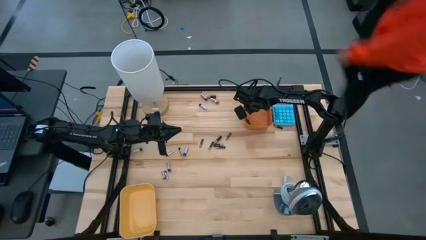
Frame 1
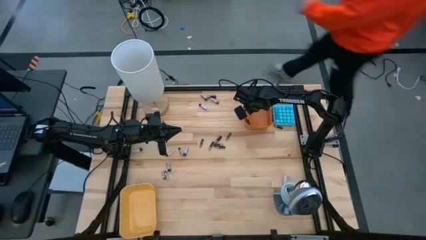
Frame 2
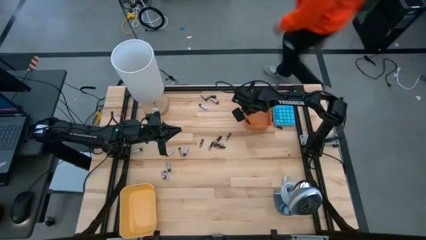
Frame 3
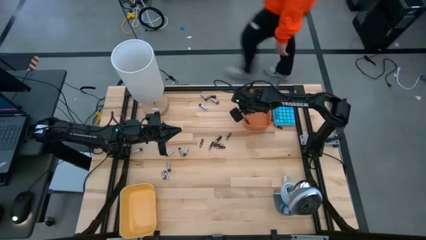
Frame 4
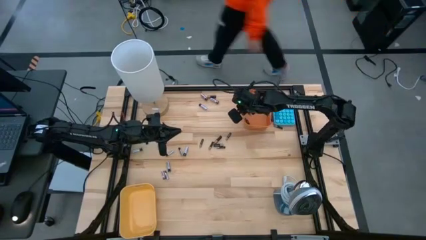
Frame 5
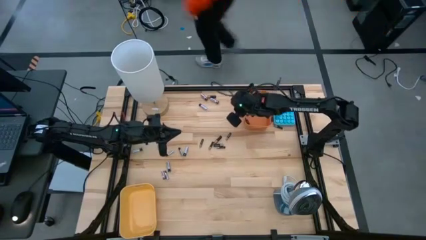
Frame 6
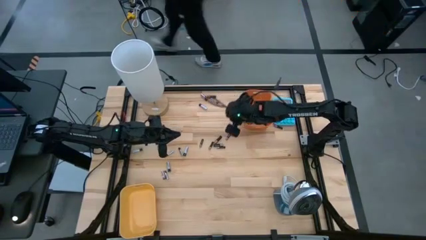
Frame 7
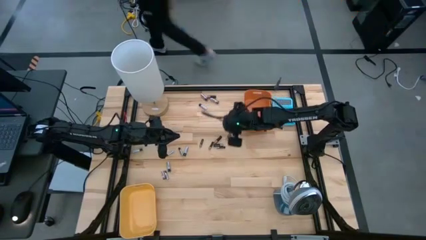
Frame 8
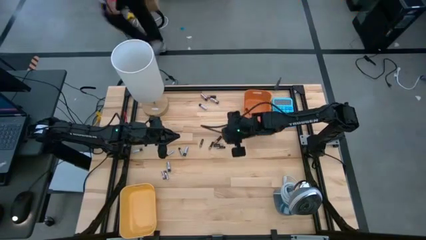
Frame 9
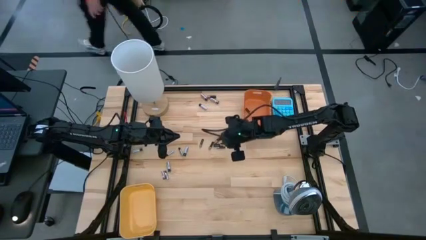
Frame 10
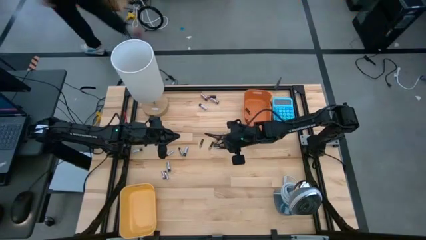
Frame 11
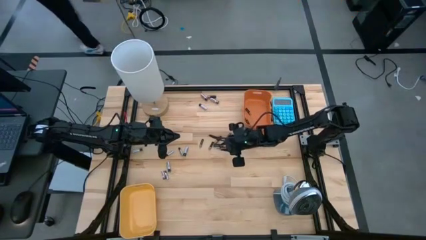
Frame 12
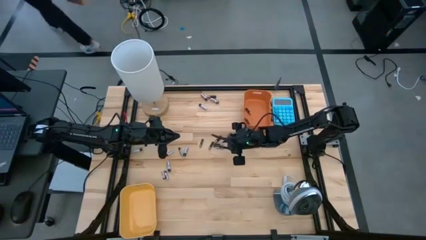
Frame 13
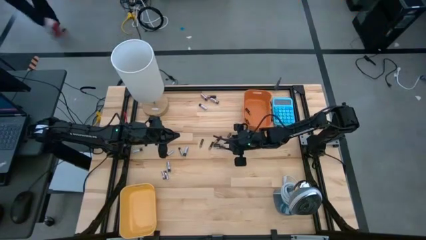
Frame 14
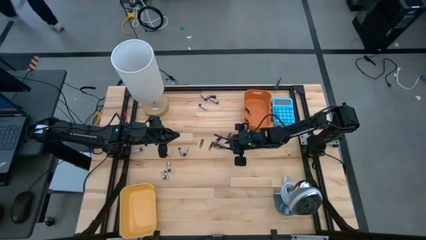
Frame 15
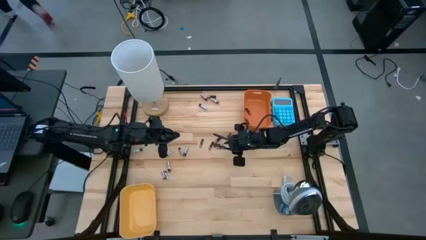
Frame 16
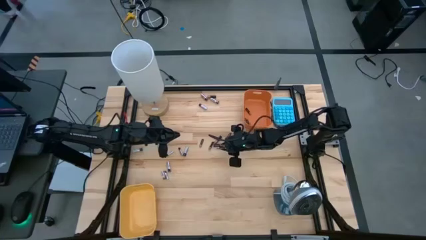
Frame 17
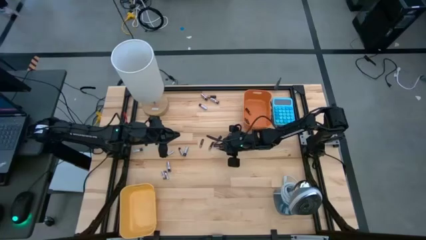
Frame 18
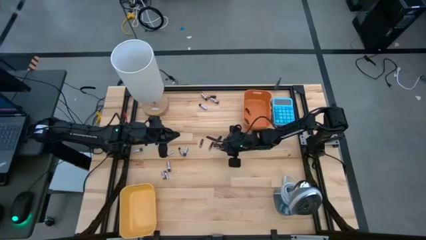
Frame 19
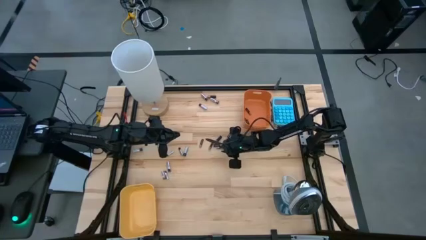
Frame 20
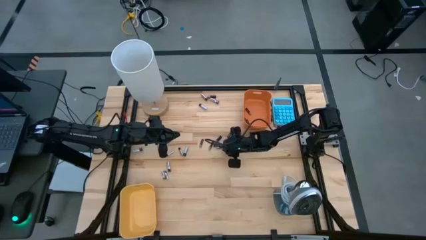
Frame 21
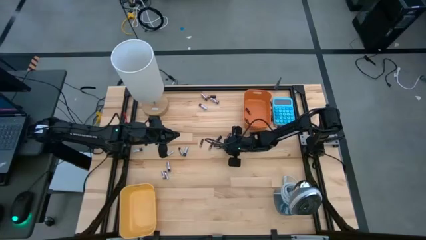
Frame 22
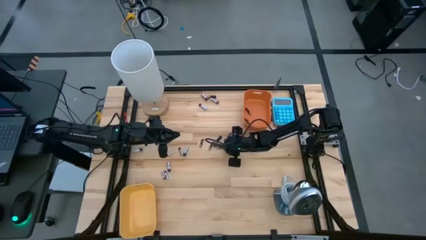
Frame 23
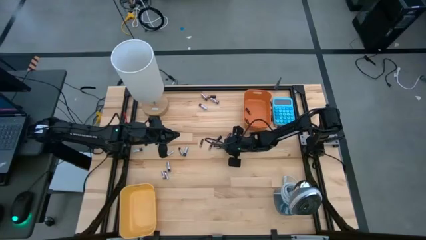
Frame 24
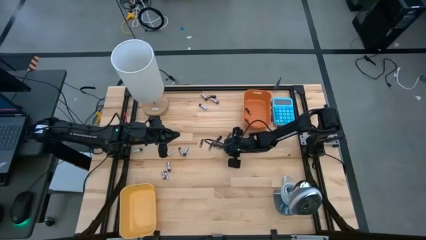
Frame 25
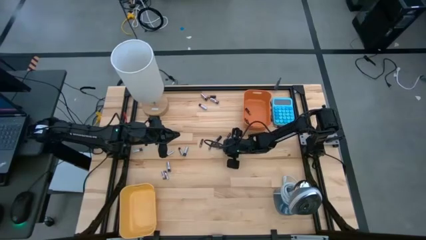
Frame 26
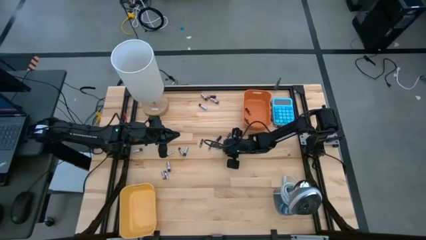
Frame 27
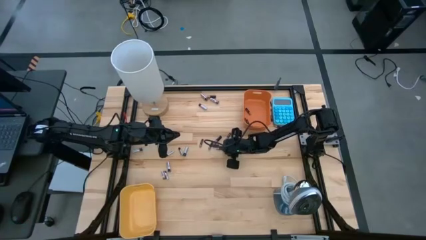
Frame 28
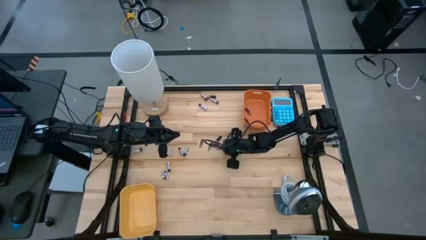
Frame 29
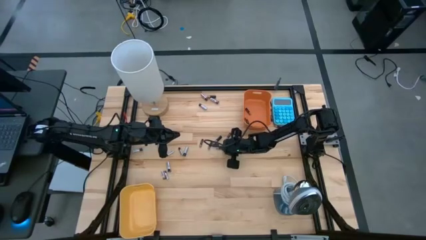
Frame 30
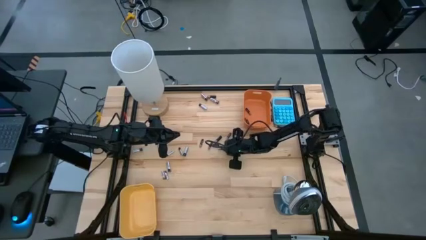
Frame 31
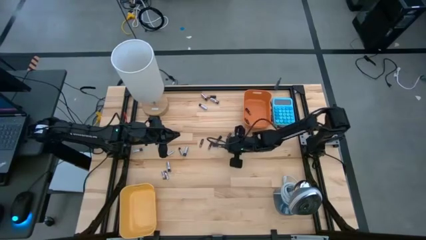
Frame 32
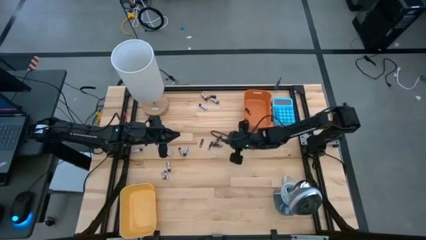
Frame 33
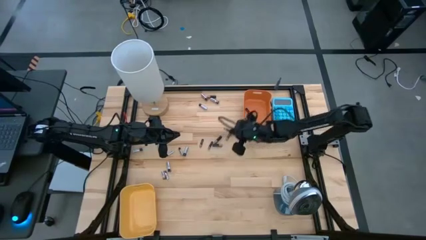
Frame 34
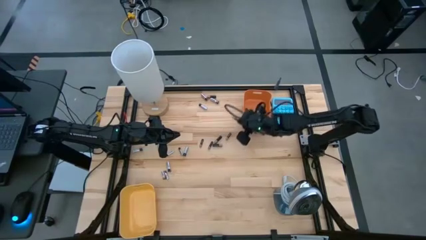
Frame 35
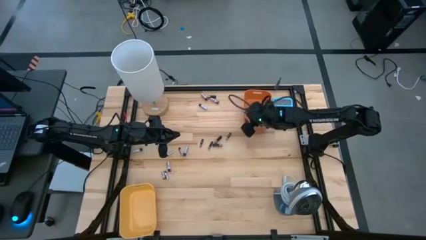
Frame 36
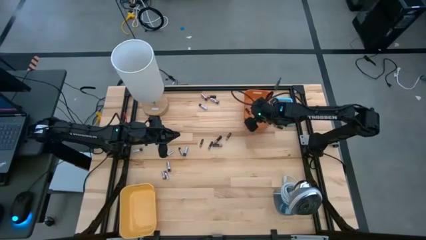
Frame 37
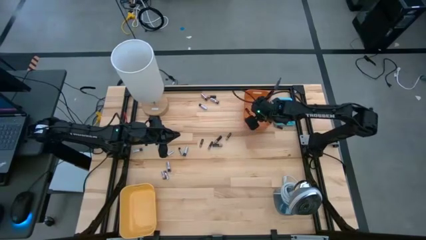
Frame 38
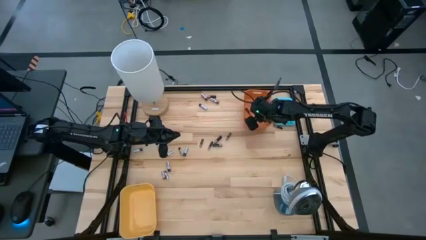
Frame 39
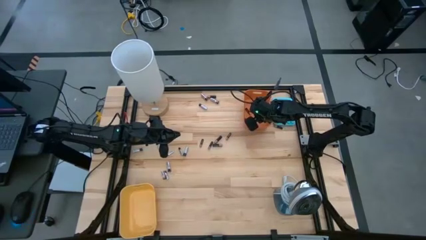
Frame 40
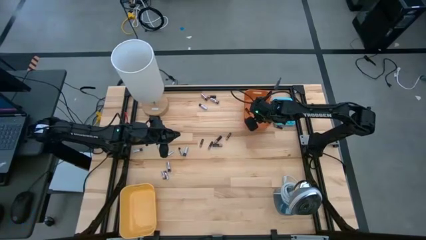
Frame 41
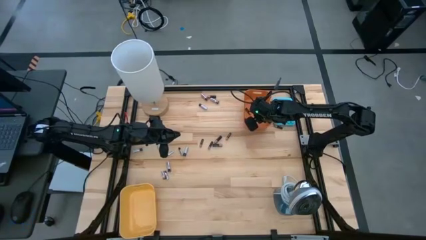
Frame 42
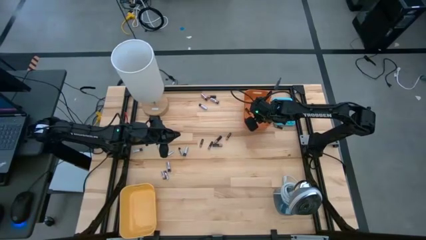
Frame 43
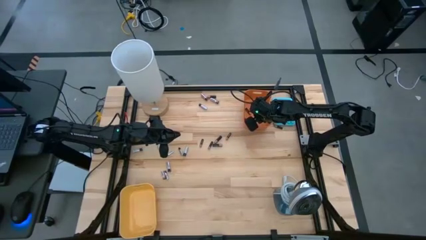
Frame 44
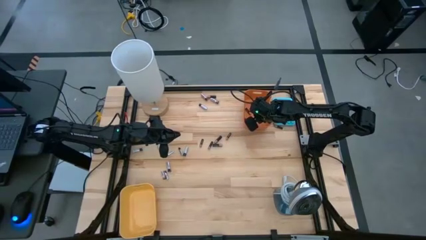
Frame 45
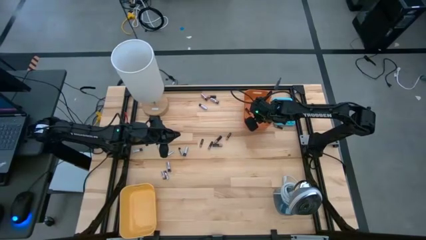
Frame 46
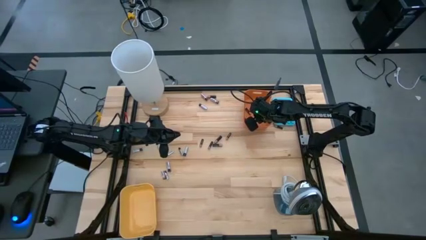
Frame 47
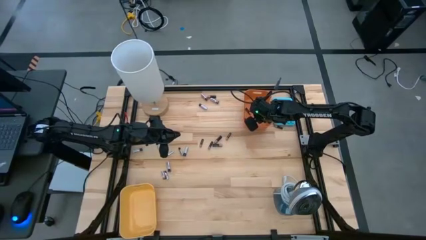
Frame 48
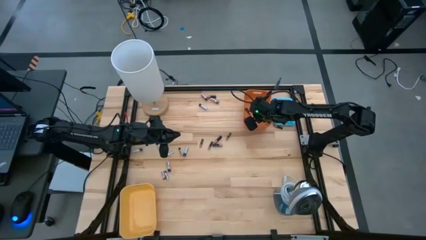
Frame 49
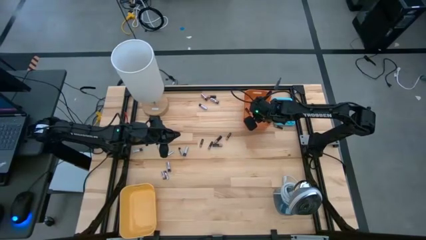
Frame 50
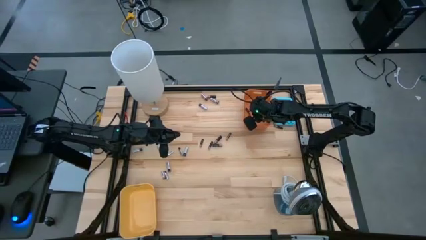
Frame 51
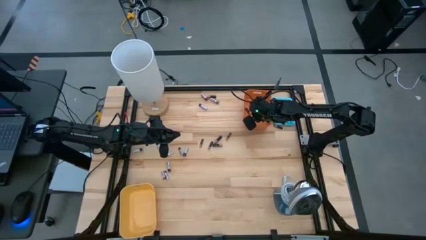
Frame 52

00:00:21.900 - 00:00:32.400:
Task: Sort batteries
Put the black battery into the orange bin
